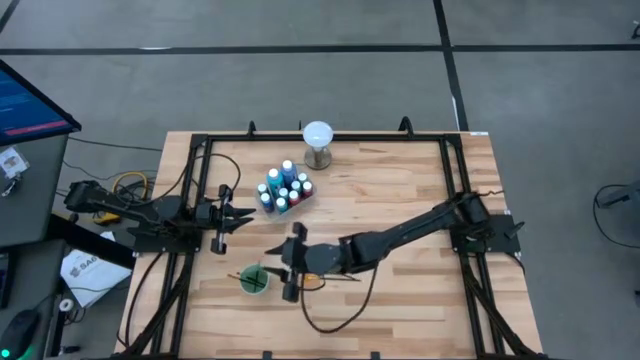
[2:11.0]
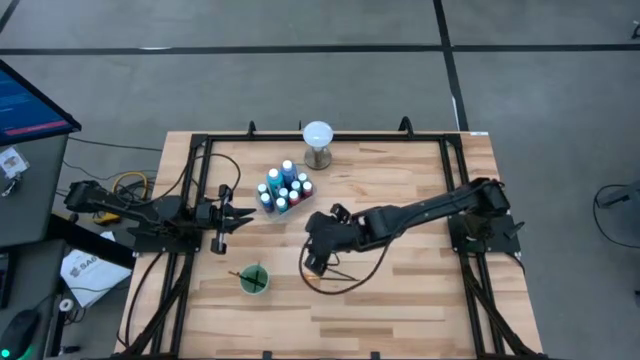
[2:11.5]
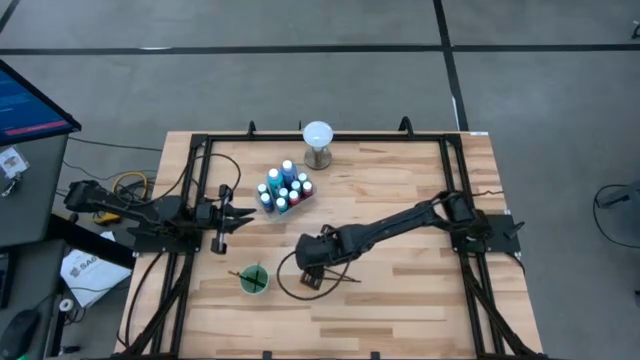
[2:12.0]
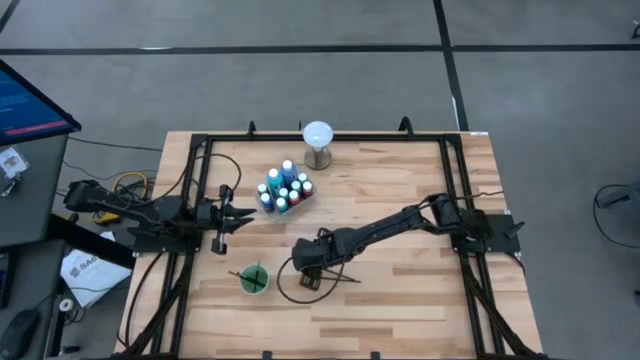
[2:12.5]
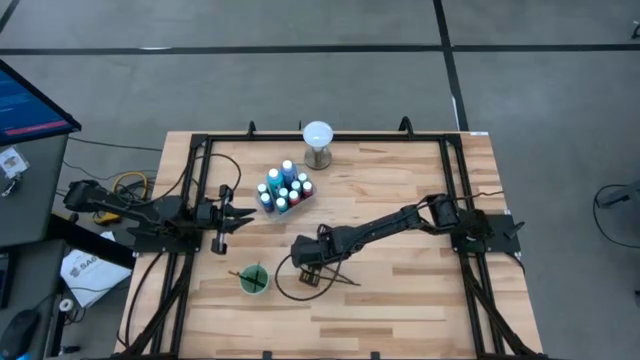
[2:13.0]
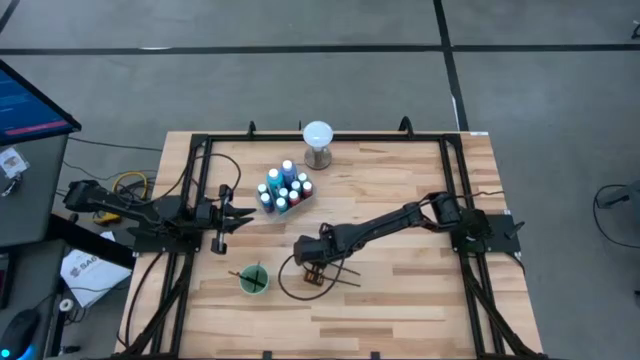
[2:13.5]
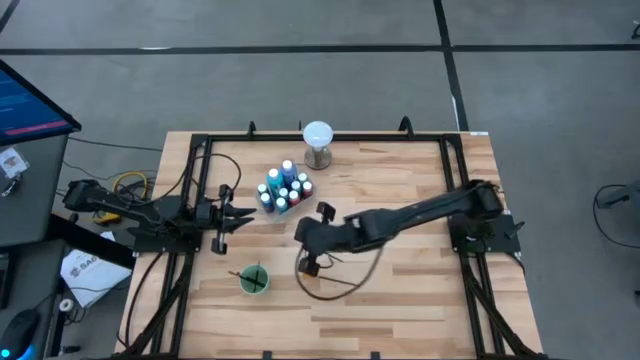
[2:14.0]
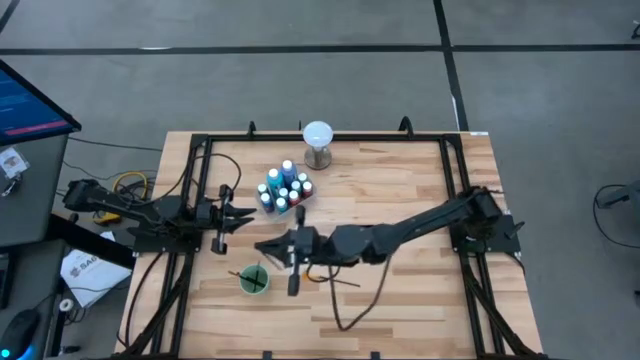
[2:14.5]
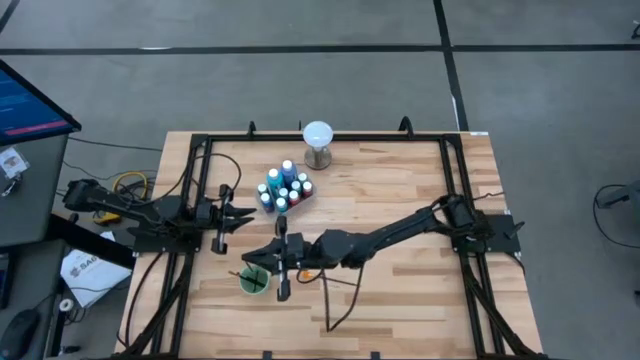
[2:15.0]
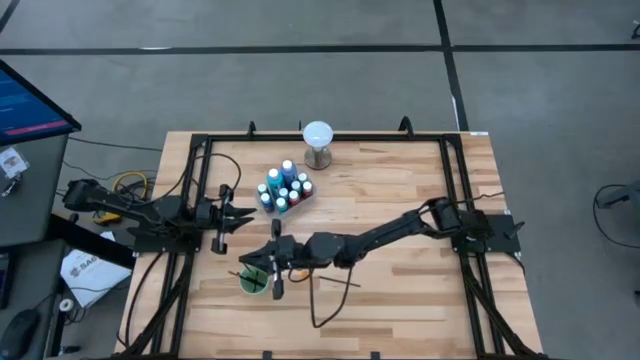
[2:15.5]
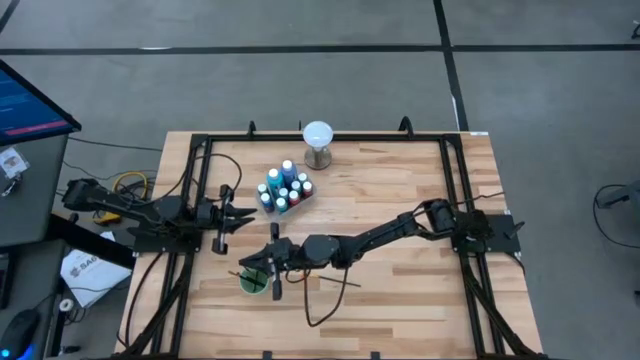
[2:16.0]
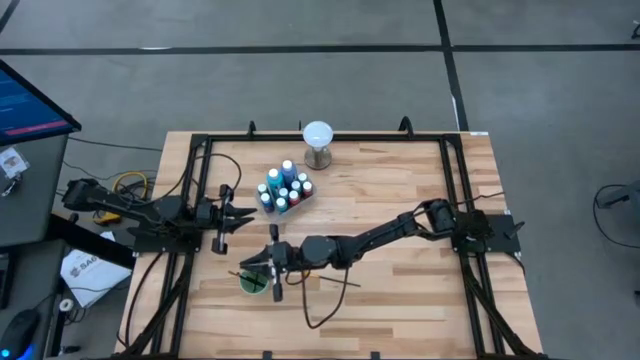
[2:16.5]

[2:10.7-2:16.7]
Task: Pick & Place Paint Supplies
Put the golden paint brush into the green cup

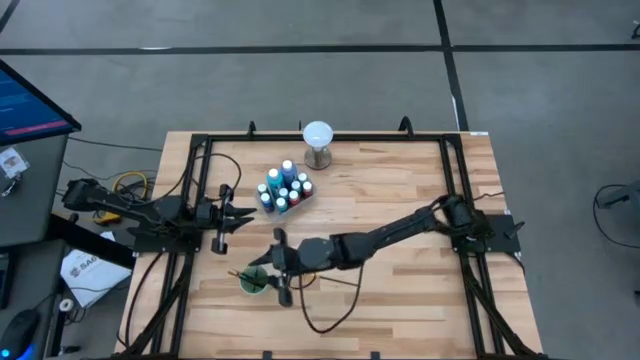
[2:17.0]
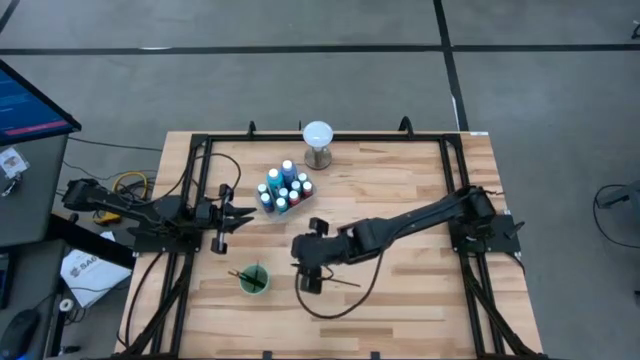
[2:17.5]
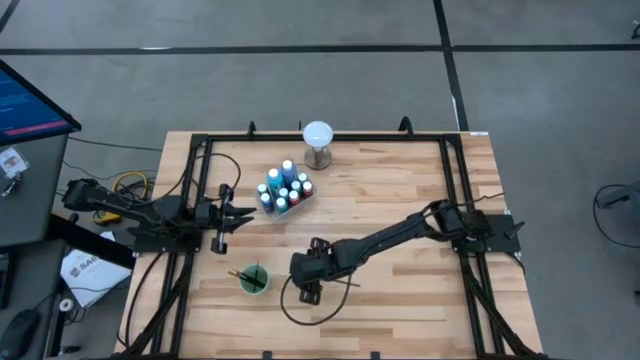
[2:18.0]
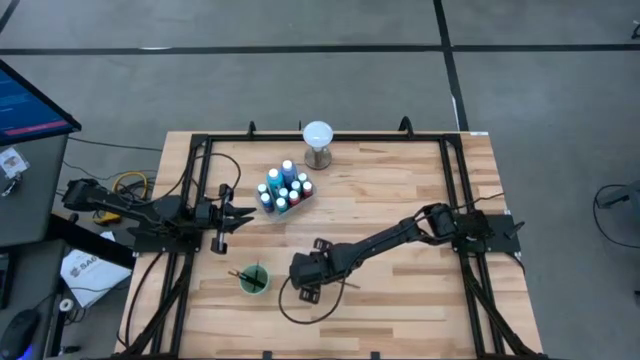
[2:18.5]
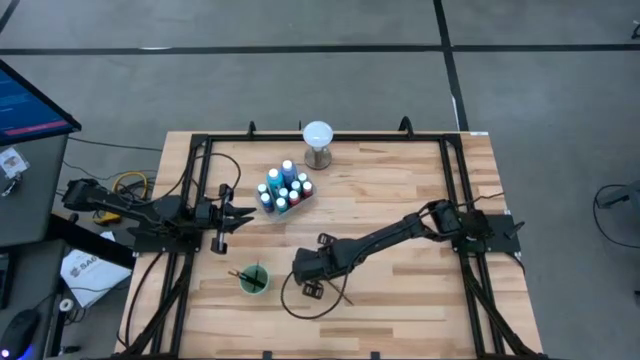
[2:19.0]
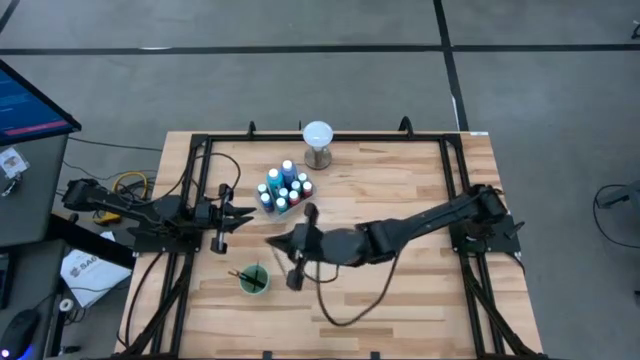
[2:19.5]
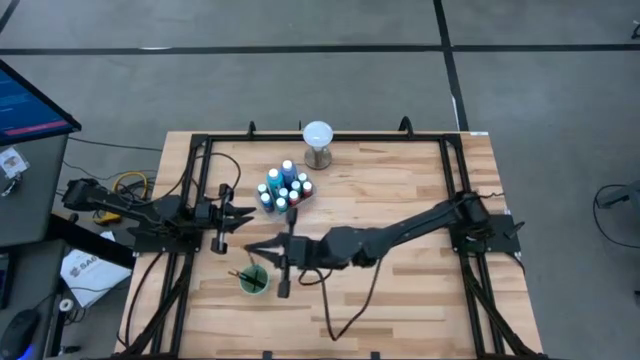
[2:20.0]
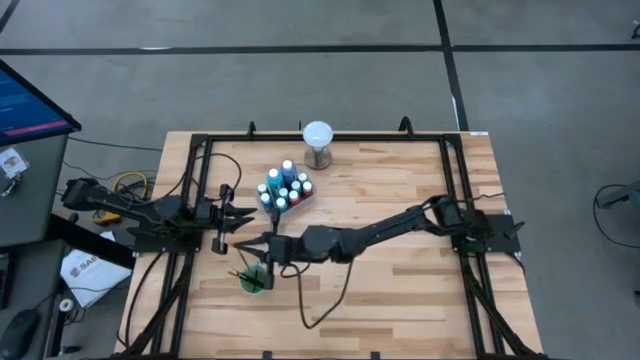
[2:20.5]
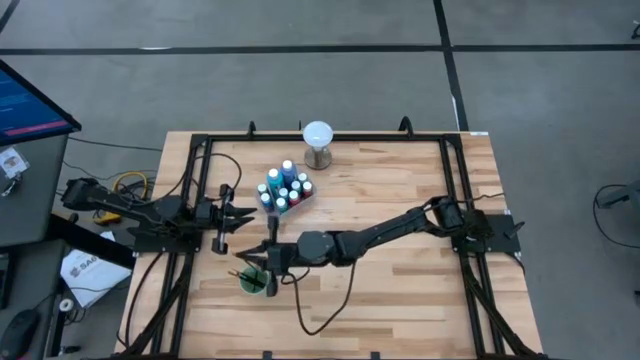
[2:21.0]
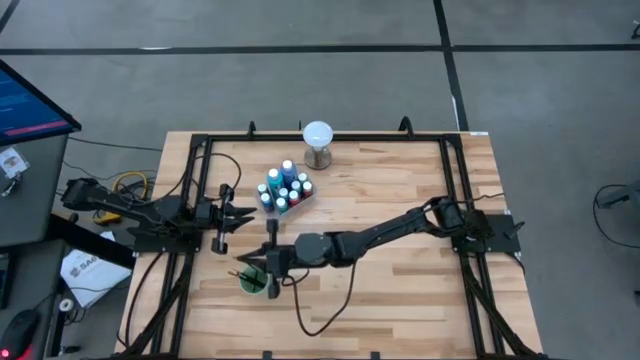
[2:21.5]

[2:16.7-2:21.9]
Put the golden paint brush into the green cup

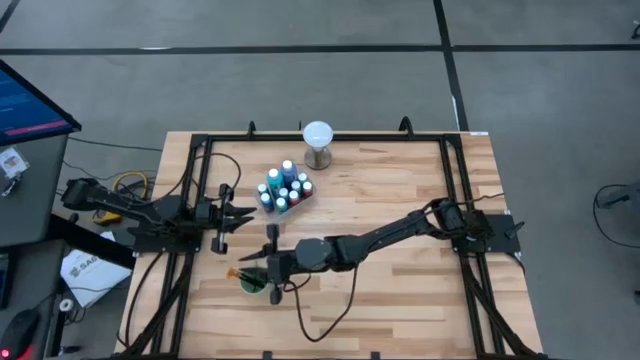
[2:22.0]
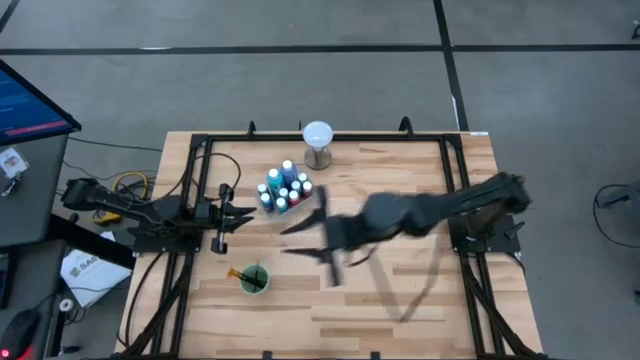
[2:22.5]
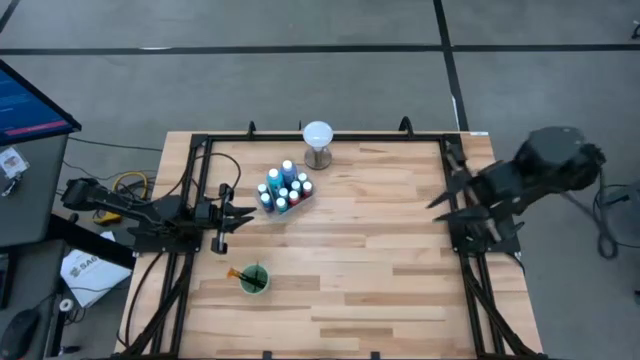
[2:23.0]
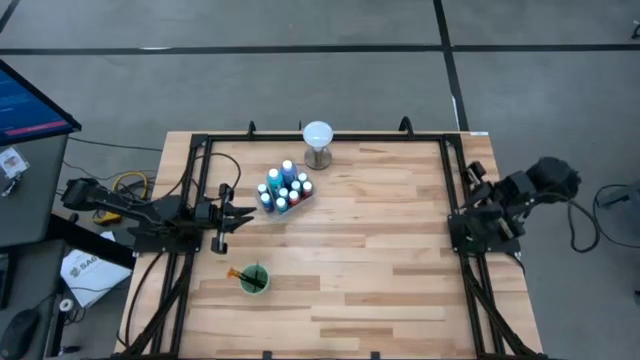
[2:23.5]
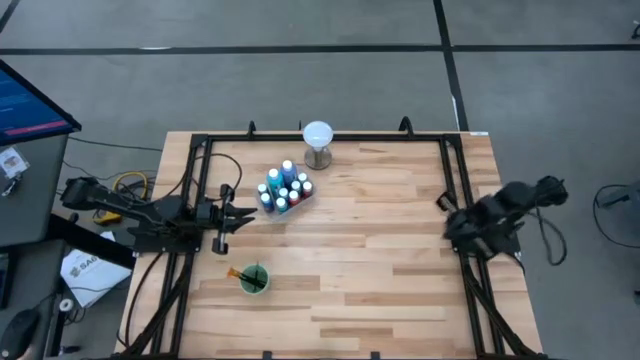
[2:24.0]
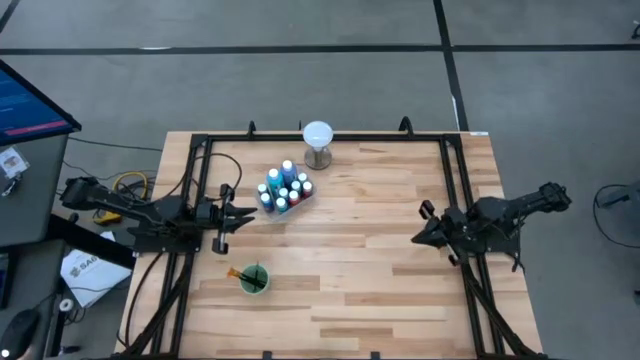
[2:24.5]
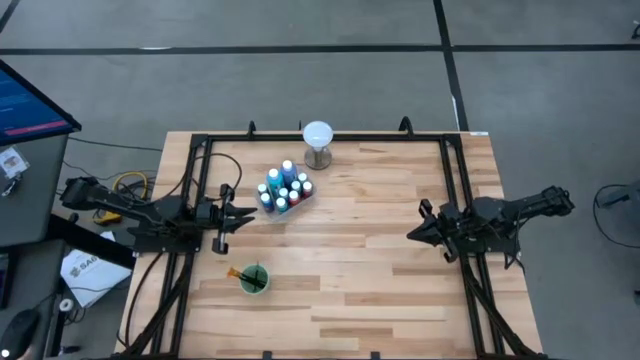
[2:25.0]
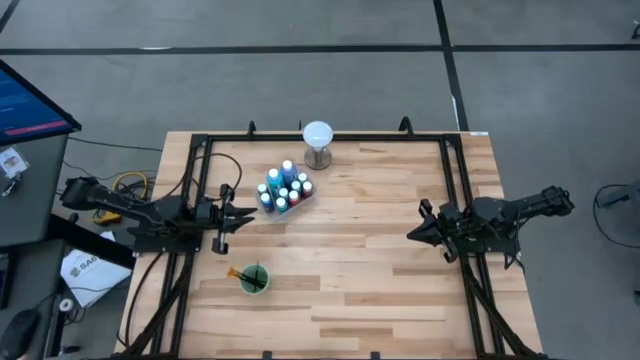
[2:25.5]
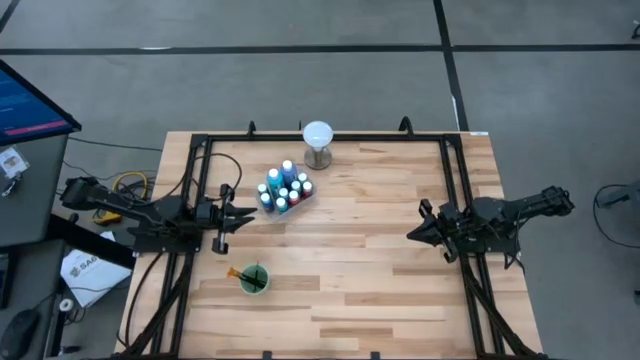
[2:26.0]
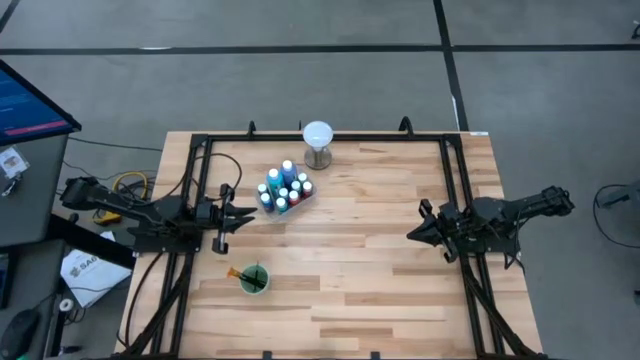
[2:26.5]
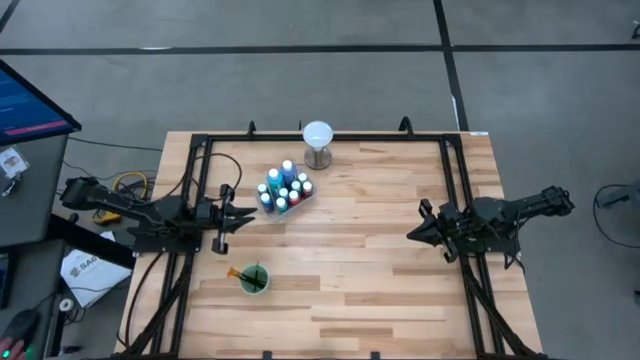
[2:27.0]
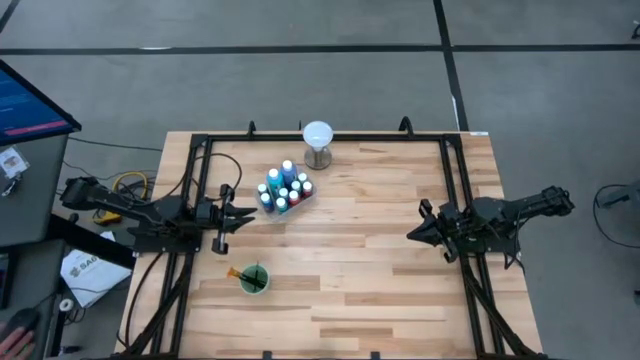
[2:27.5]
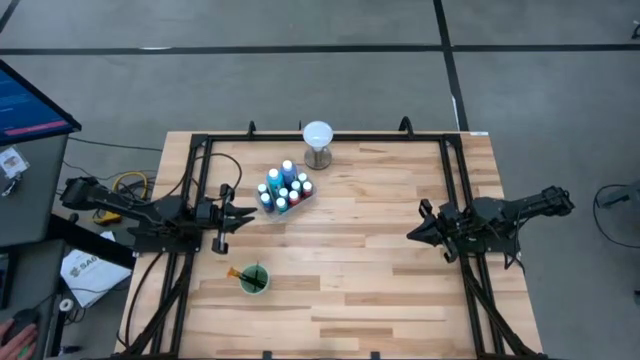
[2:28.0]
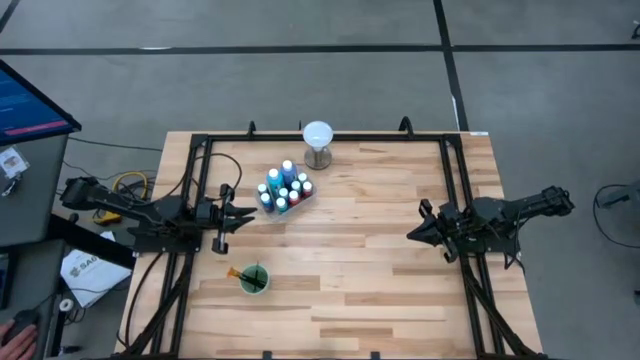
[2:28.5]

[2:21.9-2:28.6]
Return to Home Position

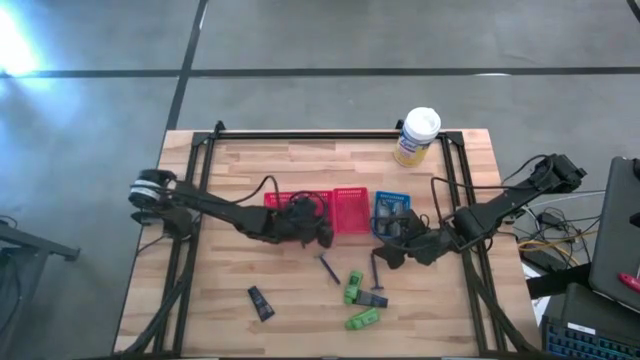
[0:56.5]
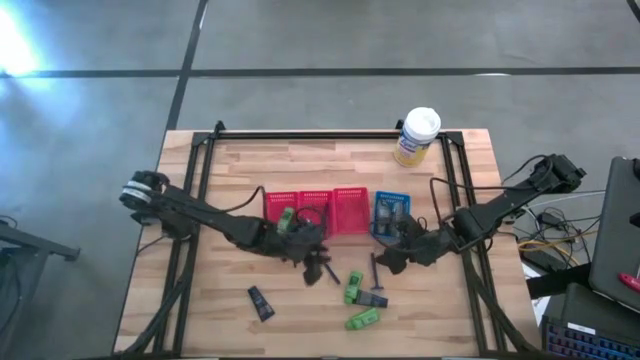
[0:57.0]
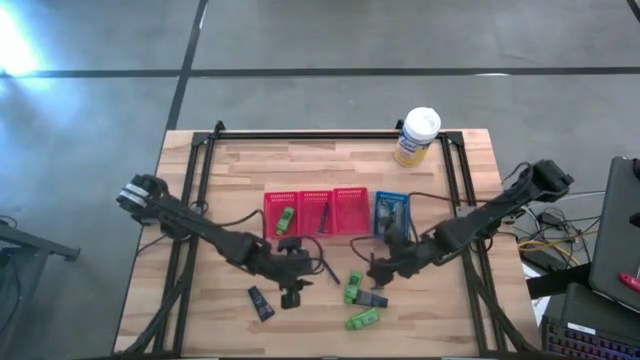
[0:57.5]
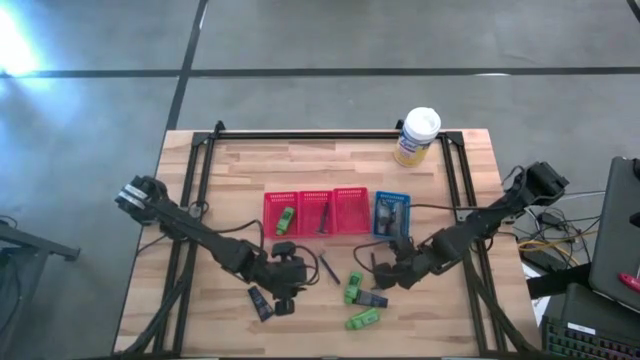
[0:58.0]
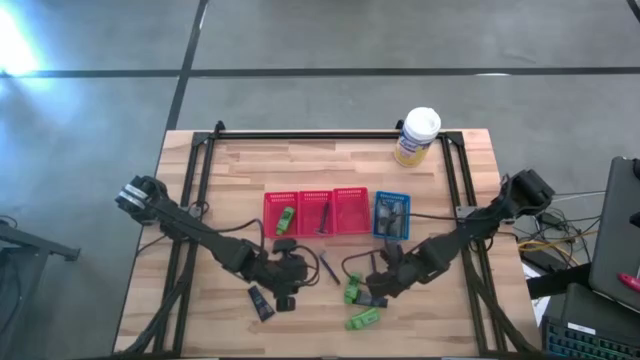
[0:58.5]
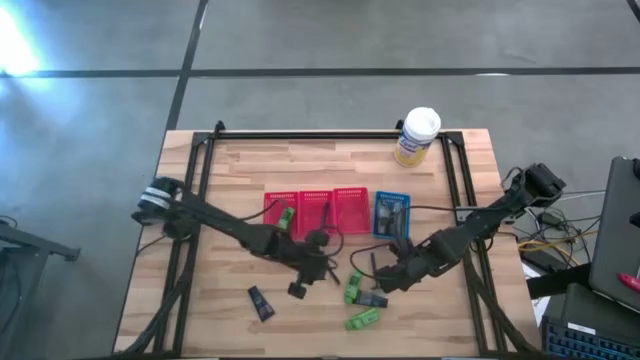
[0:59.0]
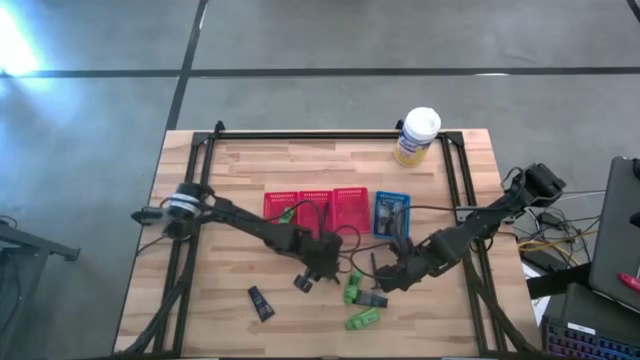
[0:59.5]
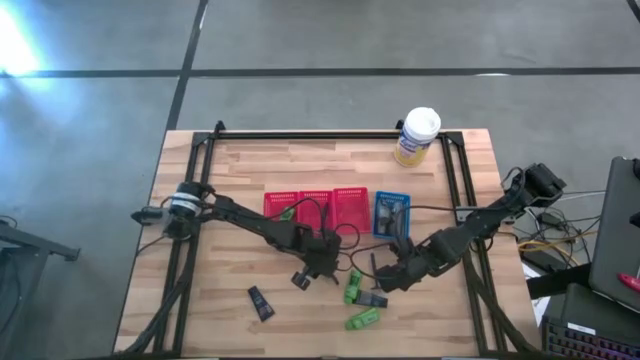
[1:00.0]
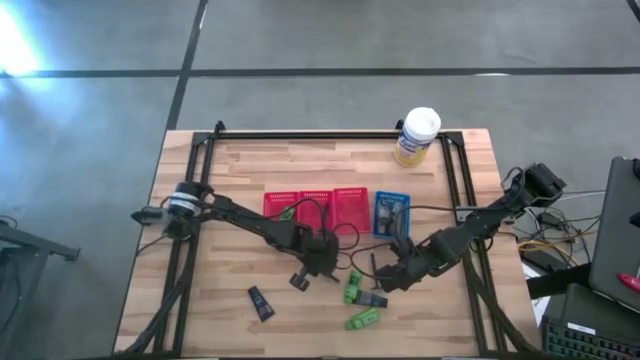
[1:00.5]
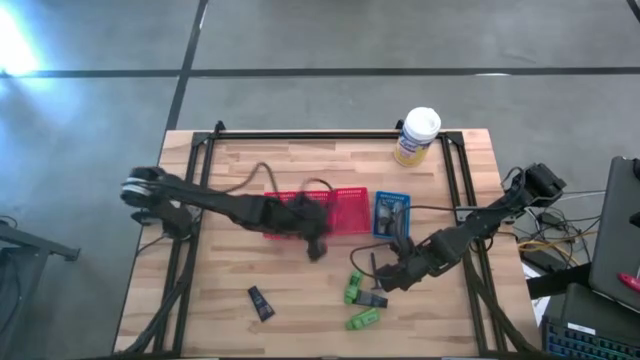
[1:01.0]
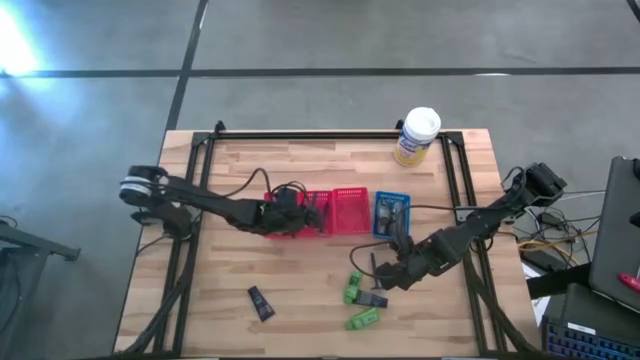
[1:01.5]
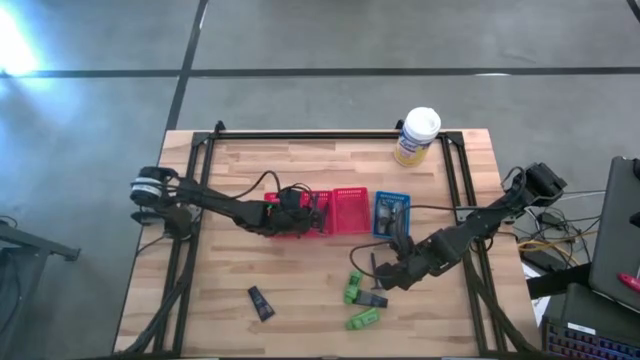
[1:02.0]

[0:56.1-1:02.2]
Task: Pick & Place Travel size toiletries
Put the blue razor into the middle red bin
